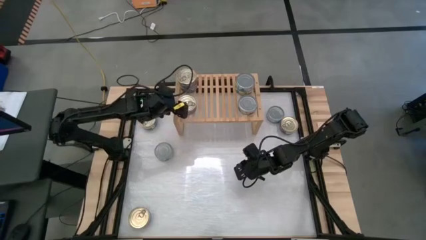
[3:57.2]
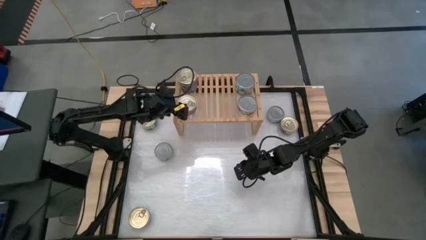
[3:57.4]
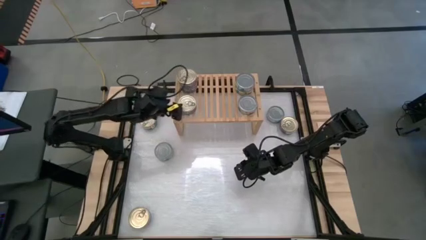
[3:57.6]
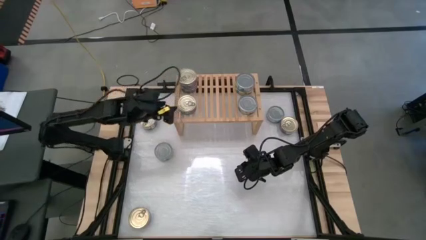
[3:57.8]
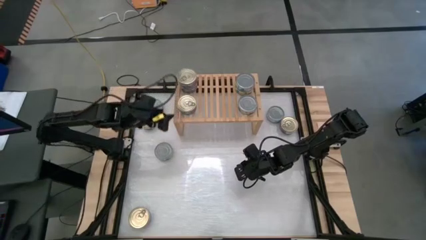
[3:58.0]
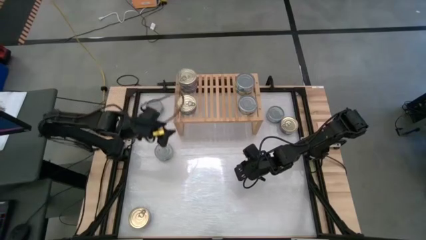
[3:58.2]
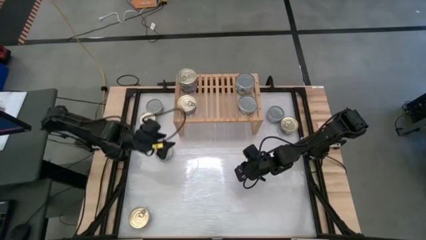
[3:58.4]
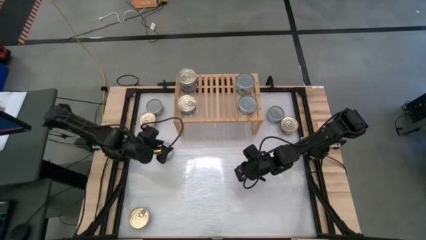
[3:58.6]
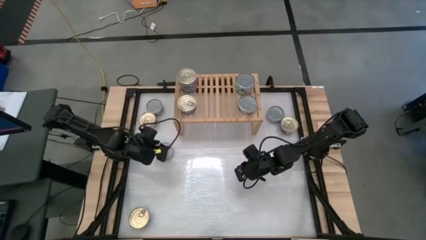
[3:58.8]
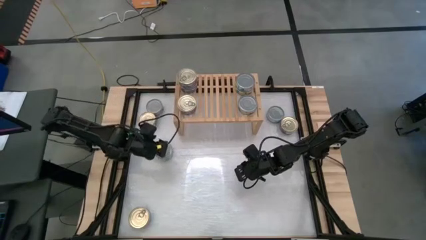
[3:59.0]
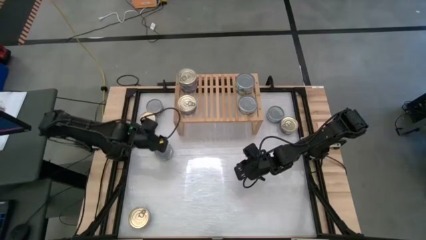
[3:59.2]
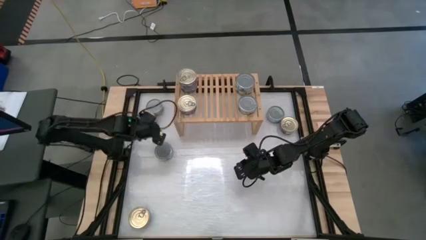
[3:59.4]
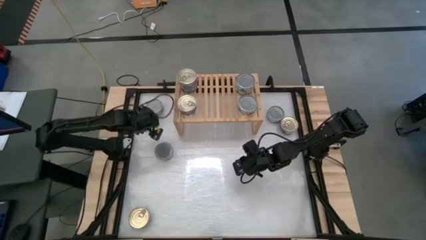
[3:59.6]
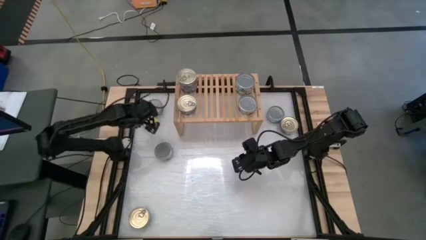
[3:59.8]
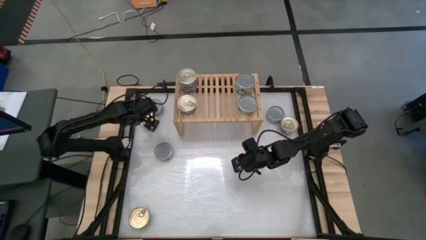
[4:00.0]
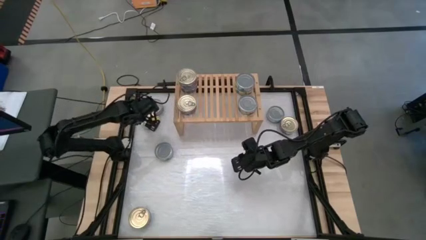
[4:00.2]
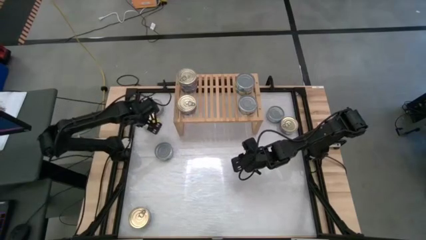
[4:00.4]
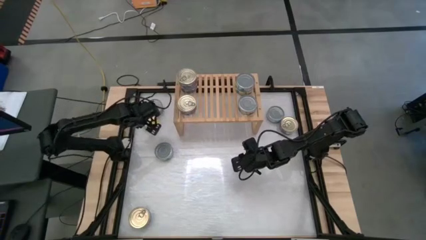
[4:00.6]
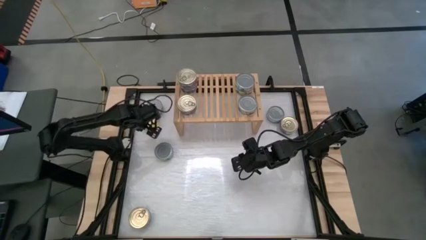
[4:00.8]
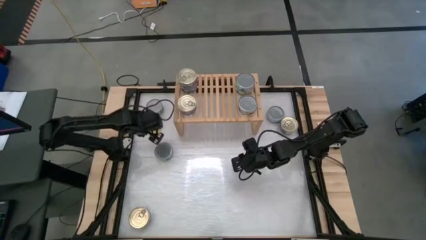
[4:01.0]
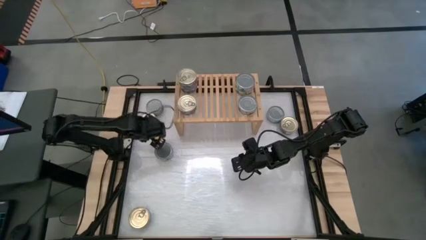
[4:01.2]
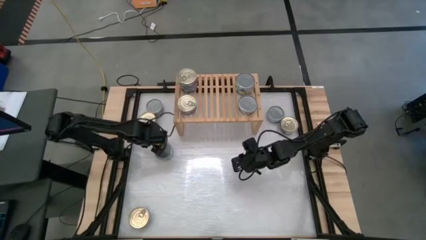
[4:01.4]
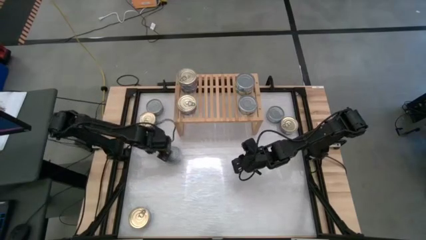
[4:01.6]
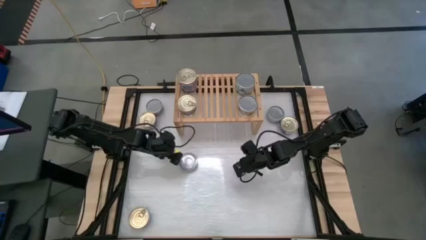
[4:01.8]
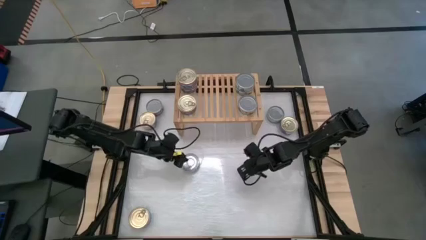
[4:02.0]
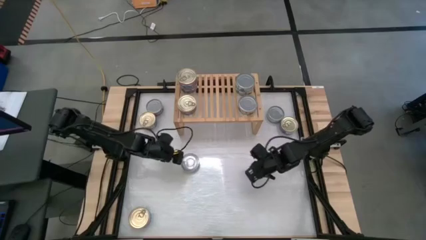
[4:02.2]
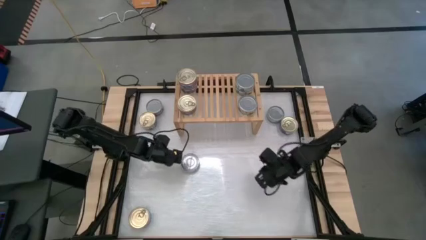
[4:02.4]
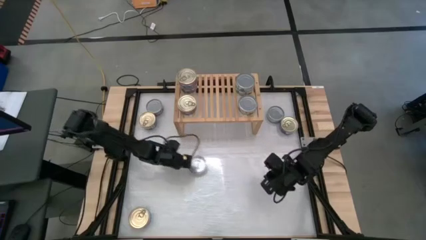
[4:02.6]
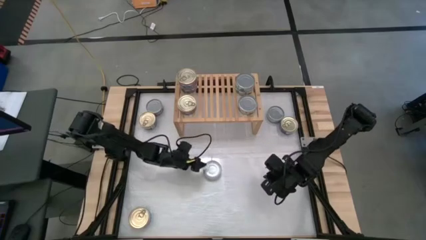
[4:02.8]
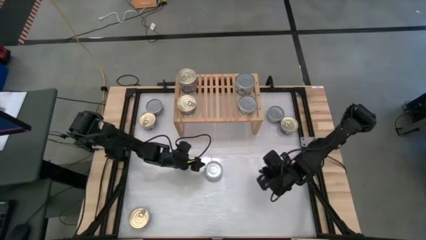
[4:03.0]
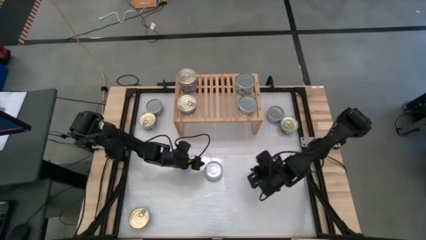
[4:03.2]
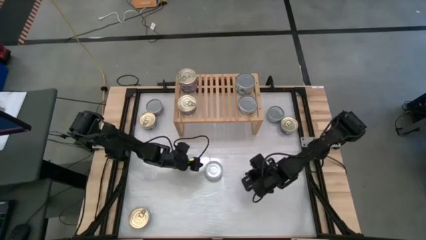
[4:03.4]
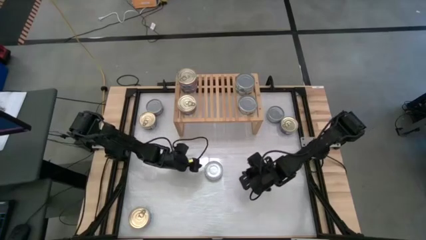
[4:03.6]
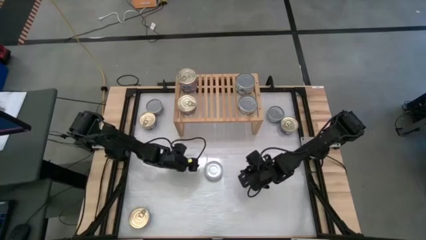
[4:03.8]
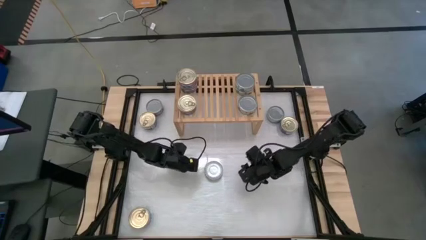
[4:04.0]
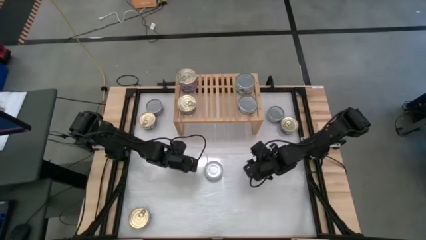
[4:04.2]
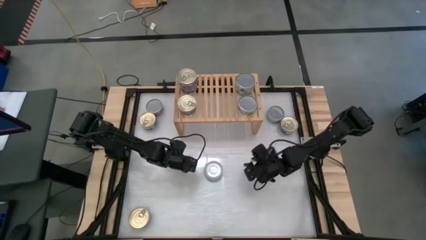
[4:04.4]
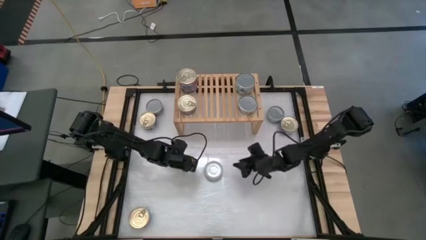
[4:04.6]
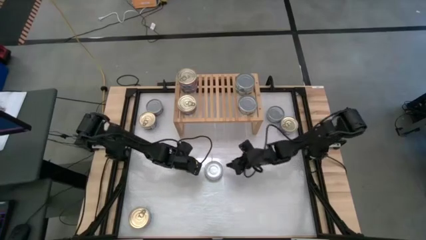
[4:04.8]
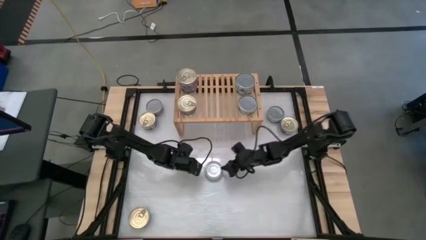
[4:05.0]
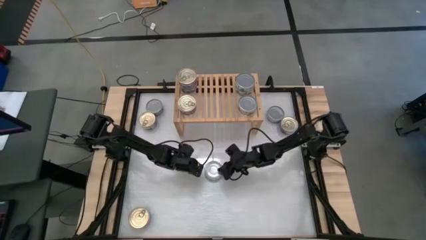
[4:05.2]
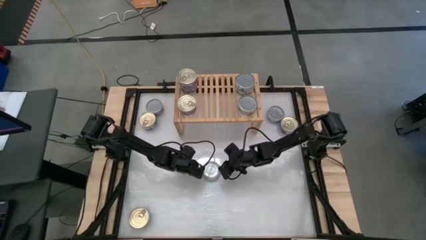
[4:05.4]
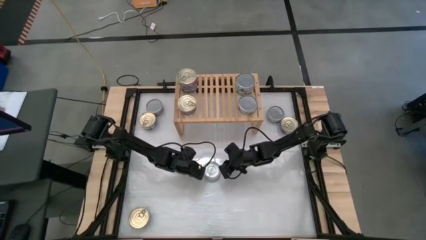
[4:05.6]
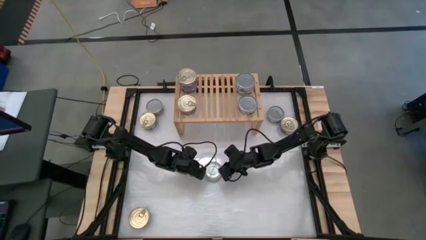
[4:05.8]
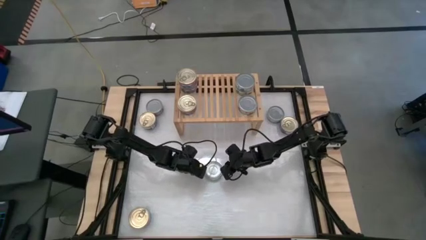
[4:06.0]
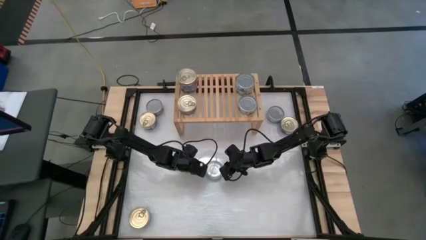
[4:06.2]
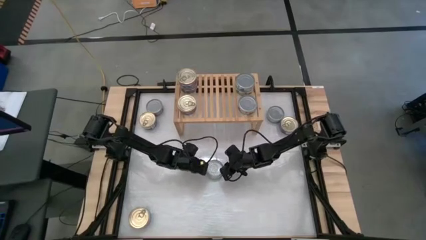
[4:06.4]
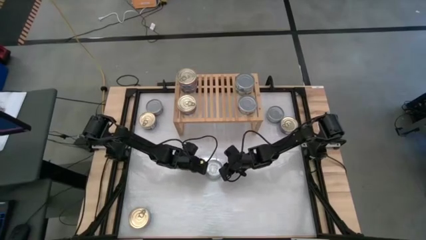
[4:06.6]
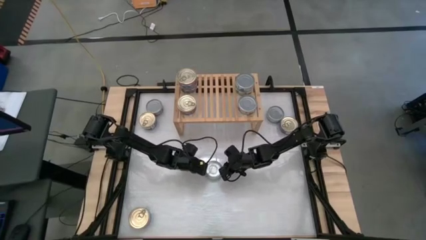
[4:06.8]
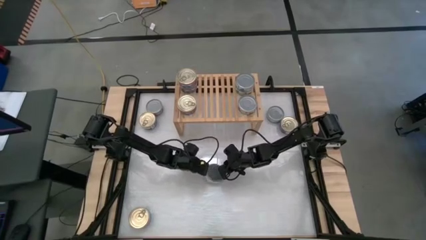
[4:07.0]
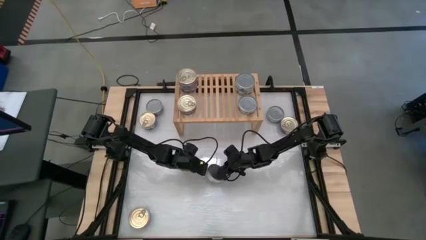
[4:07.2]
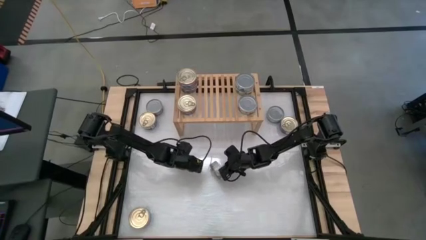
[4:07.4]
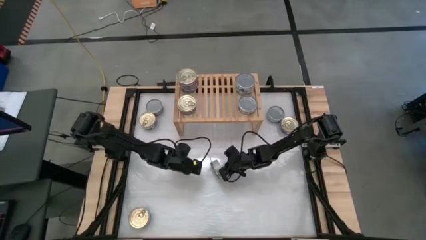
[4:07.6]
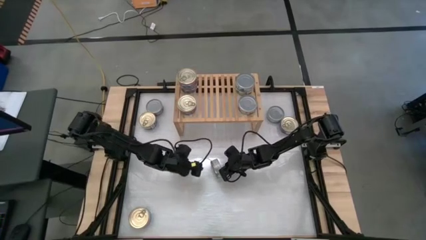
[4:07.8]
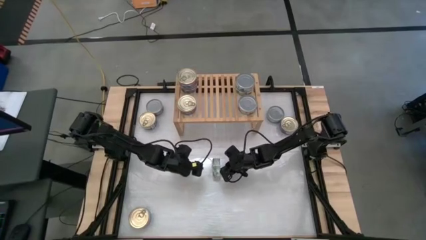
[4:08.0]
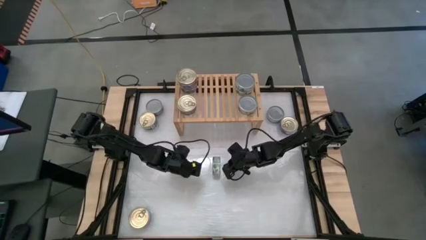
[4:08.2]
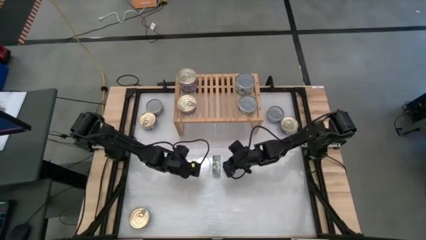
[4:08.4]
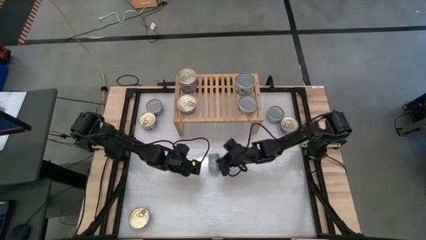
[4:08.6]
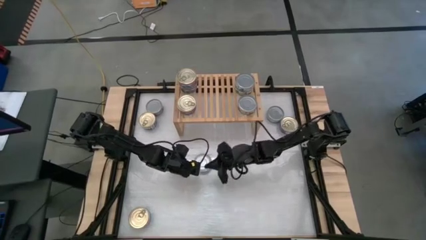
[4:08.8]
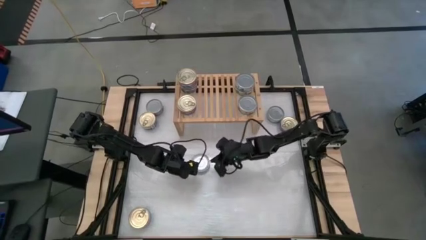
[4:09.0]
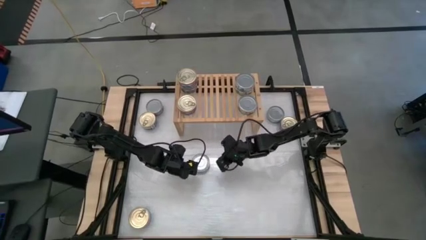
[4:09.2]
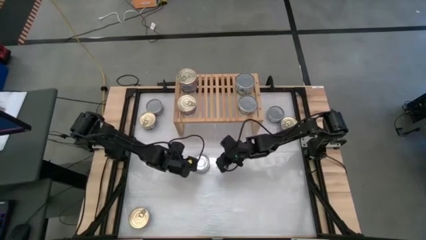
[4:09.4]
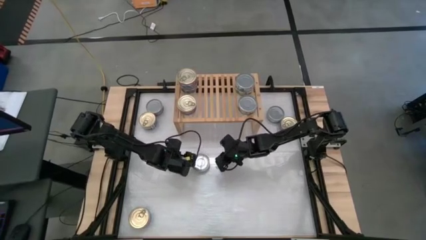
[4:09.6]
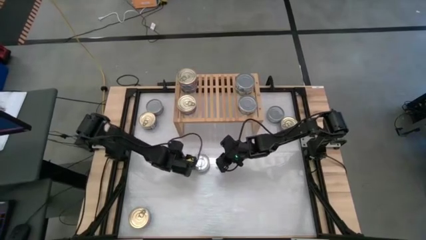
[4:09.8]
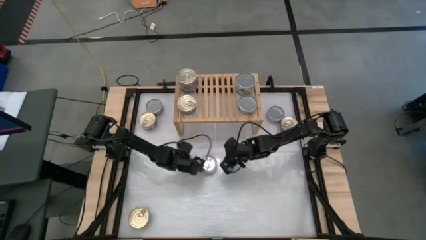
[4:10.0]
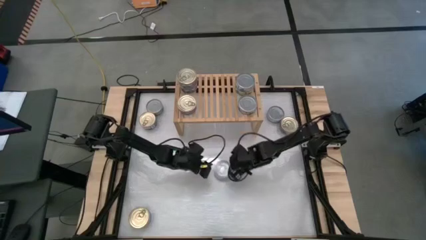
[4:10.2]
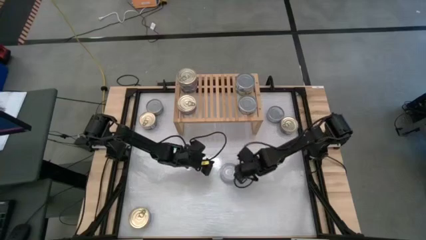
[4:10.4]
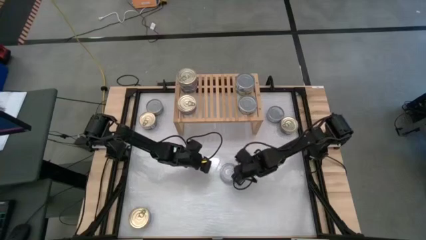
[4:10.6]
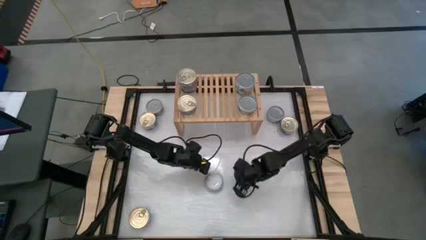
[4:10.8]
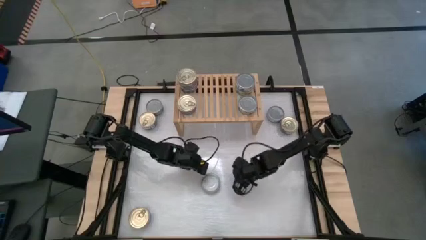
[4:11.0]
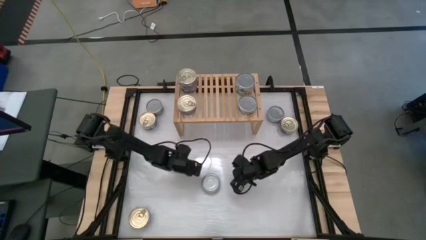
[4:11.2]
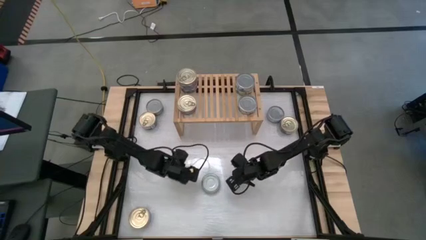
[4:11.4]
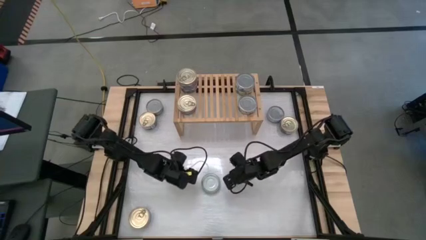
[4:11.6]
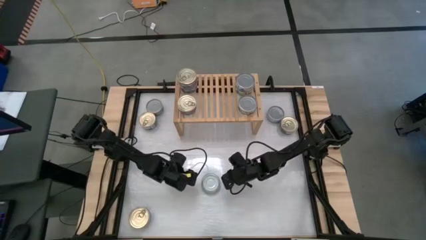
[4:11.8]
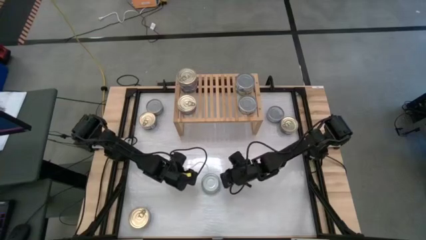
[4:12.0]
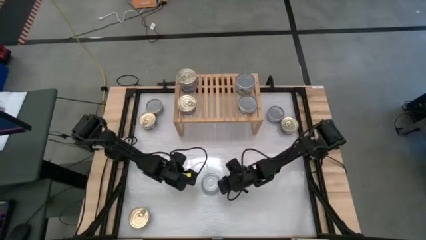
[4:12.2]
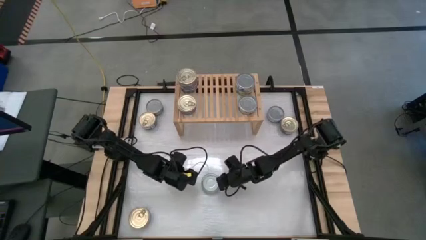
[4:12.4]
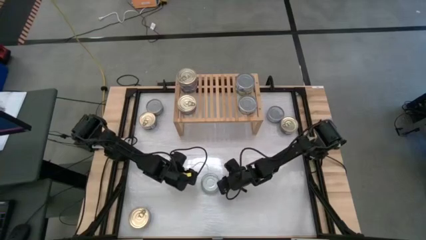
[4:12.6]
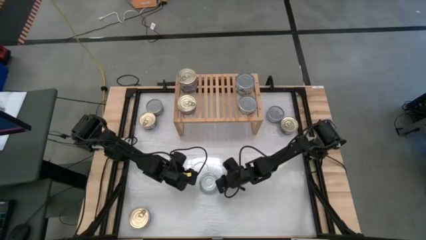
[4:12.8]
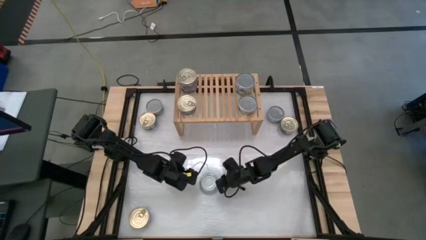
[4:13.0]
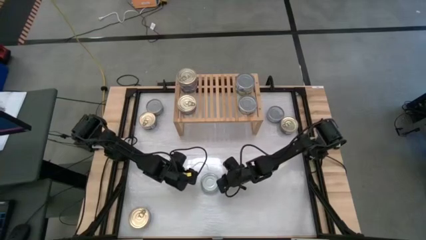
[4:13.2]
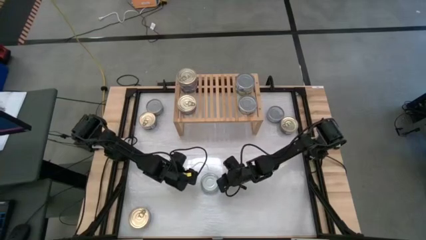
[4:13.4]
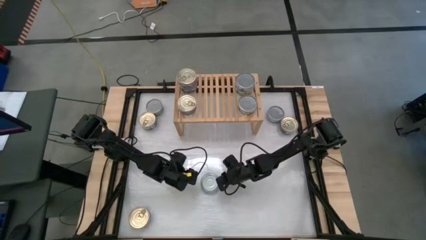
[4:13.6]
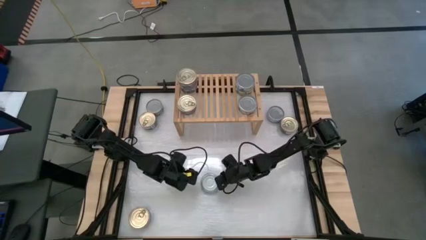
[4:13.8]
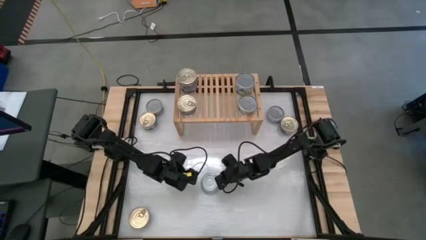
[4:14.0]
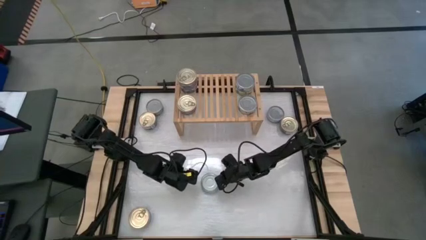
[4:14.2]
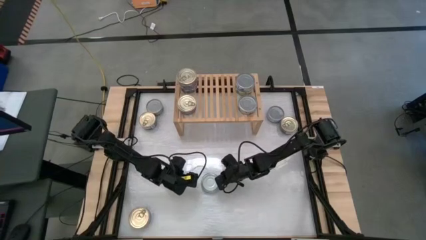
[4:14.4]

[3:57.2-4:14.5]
Task: Stack canned seafood by type on shelf
Stack the green tuna can on top of the other green tuna can on the shelf
